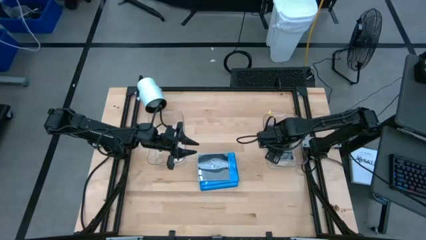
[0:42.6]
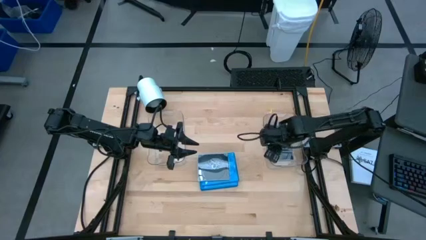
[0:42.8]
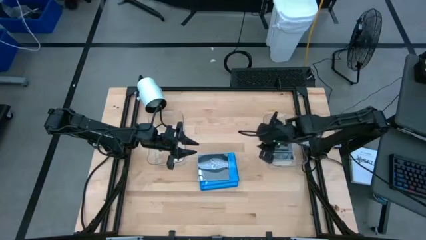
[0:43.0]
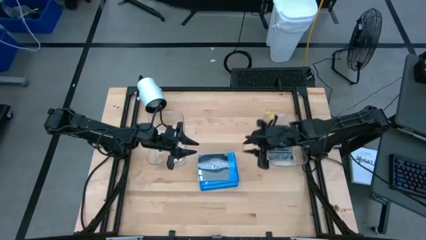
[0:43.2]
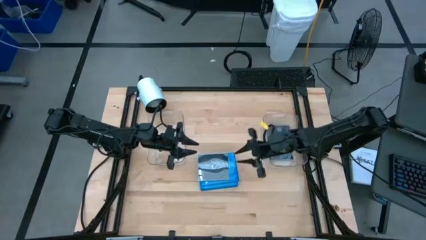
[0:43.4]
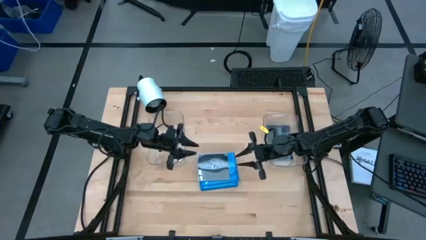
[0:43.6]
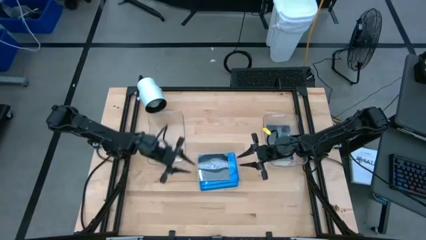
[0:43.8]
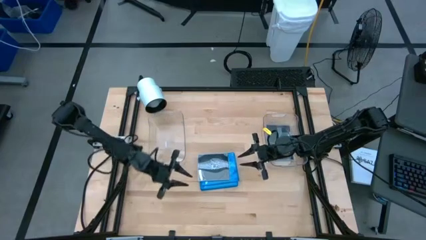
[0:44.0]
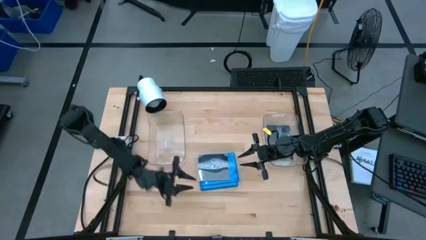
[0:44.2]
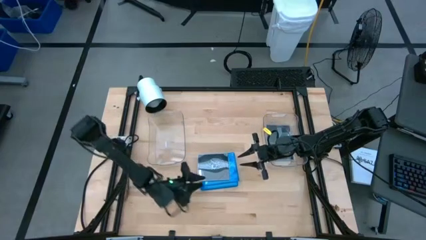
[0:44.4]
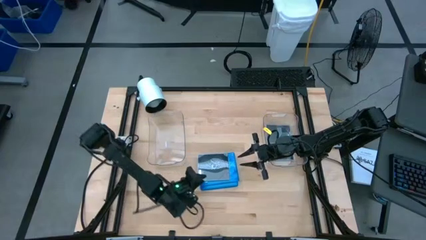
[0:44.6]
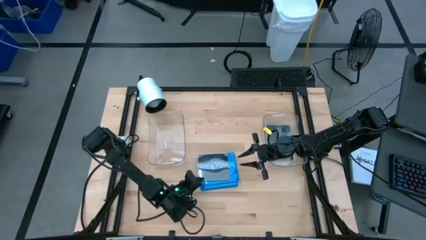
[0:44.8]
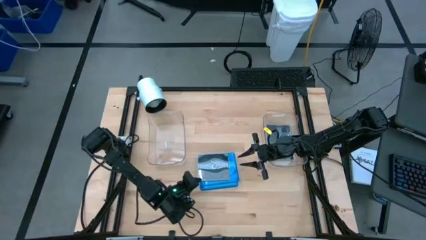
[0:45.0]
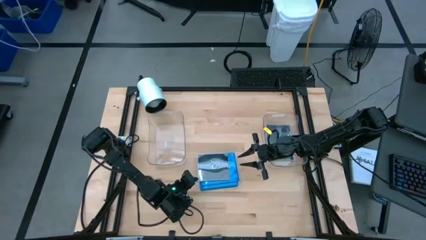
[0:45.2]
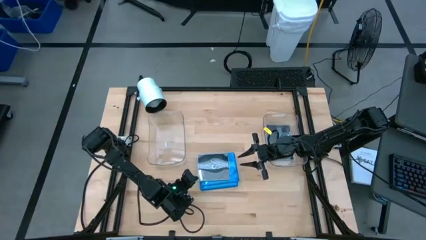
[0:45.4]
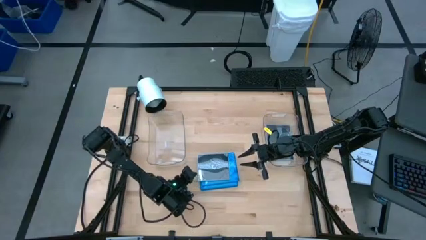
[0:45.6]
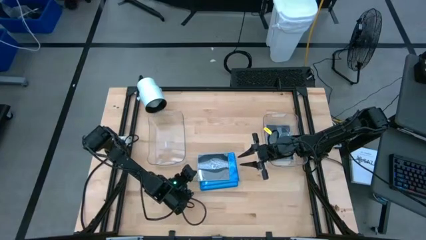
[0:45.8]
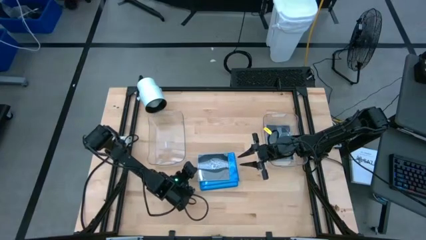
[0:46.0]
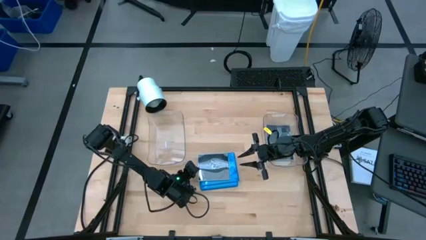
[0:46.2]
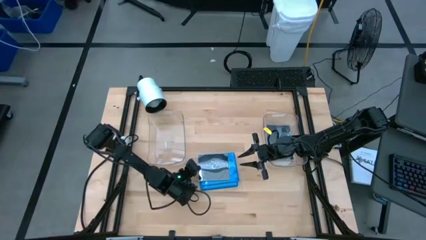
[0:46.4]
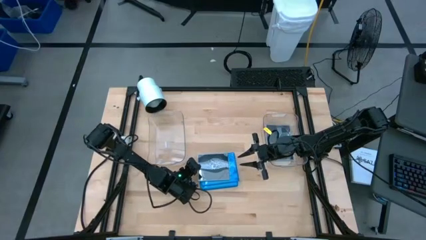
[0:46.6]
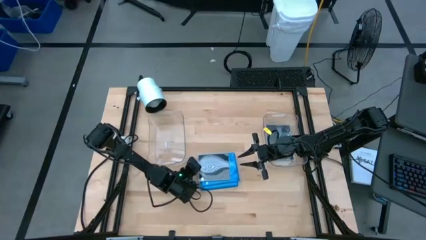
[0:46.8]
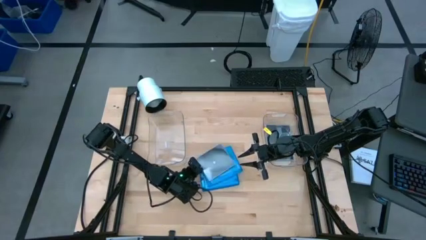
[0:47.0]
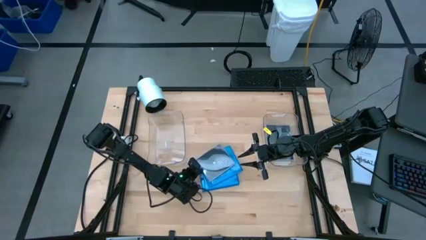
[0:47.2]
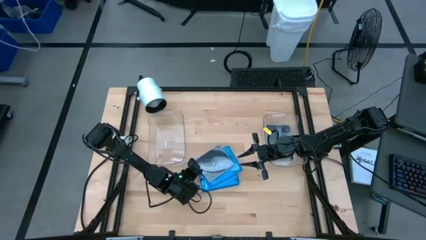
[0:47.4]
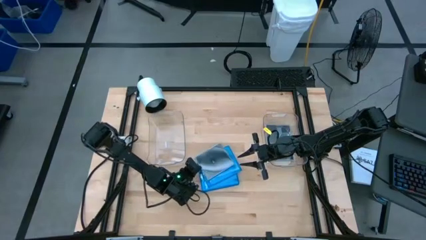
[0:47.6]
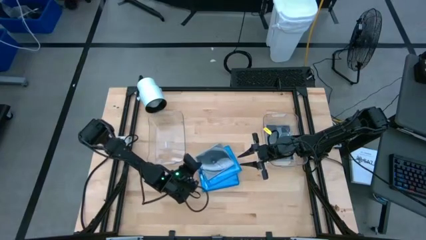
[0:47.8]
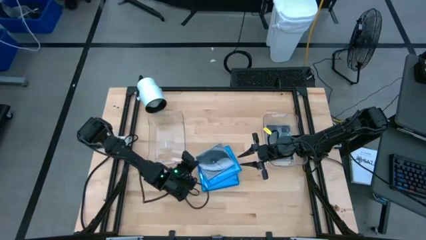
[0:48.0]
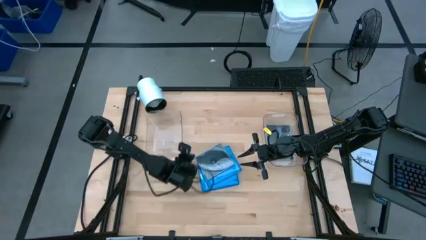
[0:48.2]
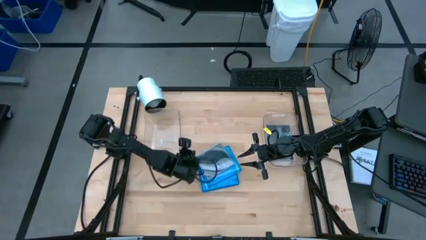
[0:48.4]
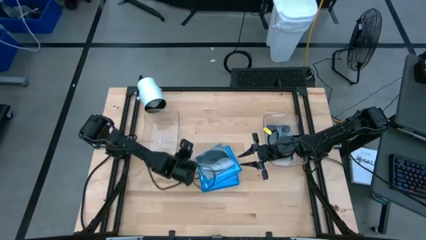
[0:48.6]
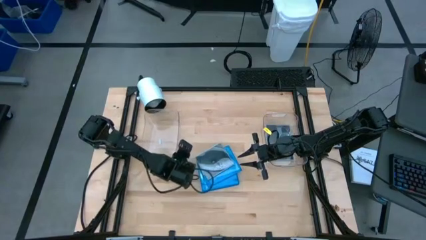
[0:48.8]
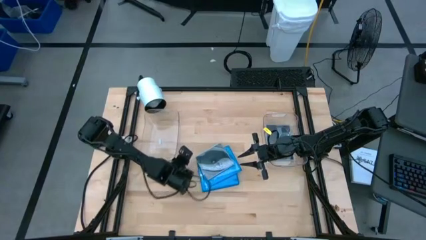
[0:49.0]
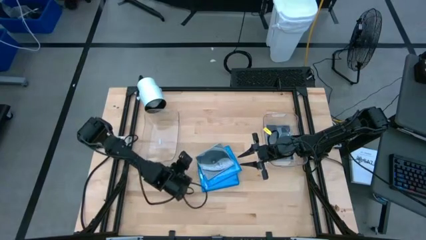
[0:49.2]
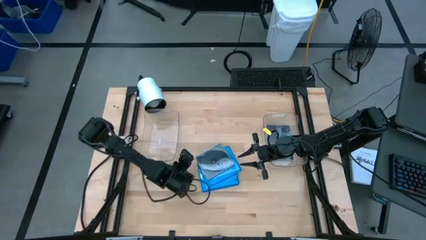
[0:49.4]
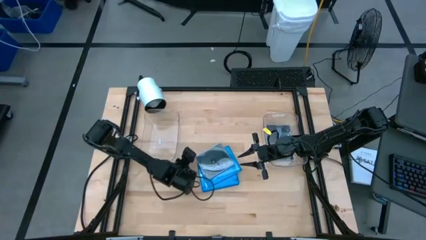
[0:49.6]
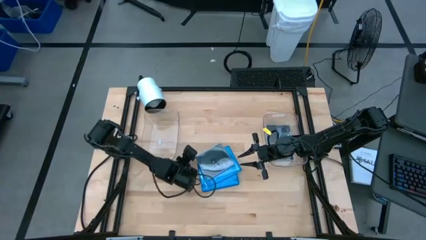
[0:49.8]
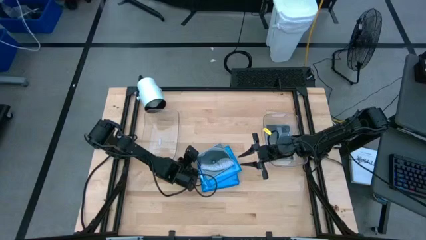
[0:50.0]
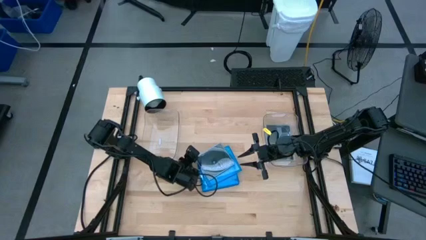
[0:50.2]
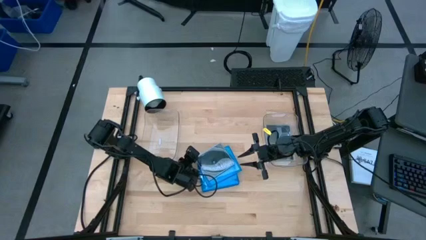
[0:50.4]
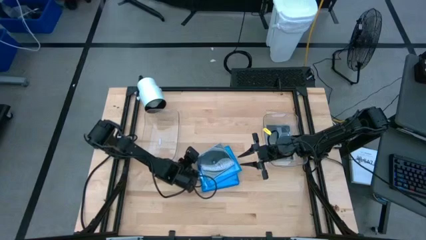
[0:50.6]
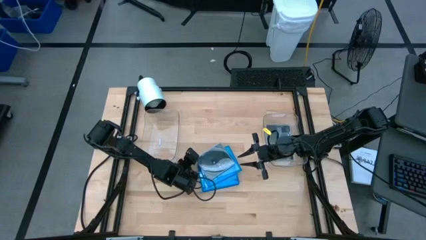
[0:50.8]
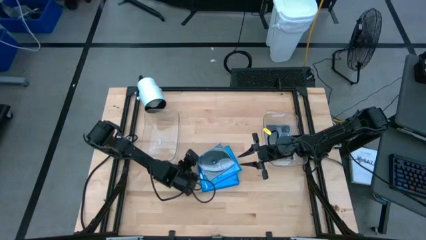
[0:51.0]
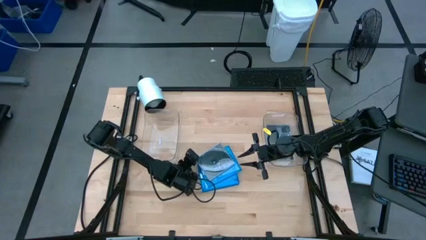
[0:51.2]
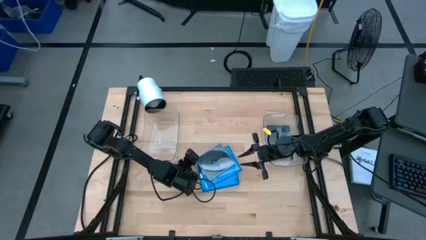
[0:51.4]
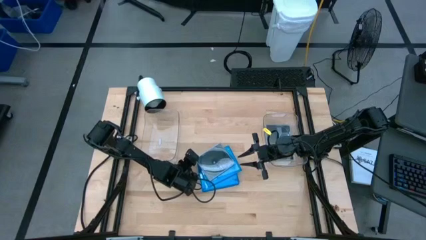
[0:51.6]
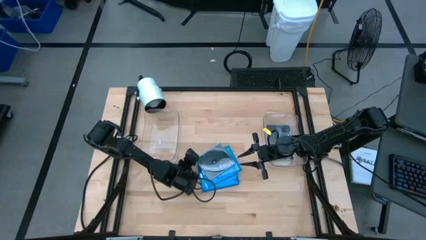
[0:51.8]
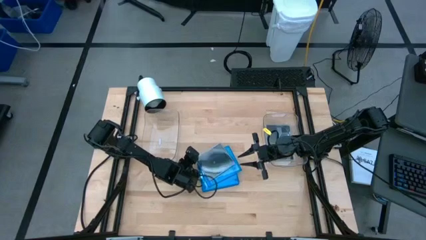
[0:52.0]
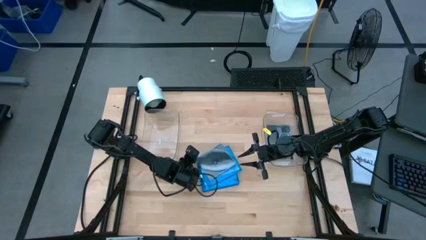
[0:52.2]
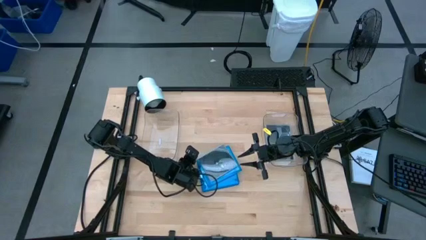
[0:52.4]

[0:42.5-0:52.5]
Task: Pick & place jewel cases by type
Put the black CD case into the right transparent bin
